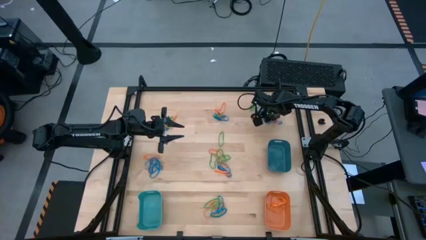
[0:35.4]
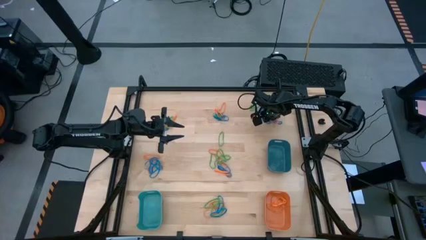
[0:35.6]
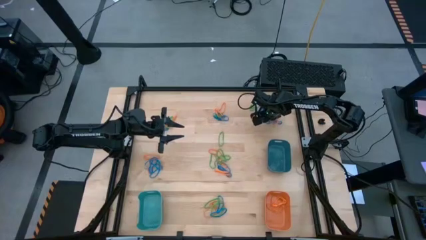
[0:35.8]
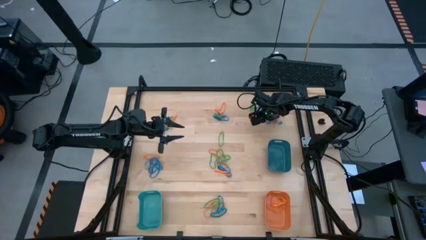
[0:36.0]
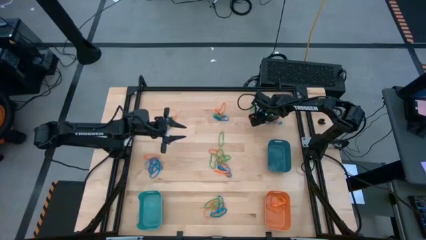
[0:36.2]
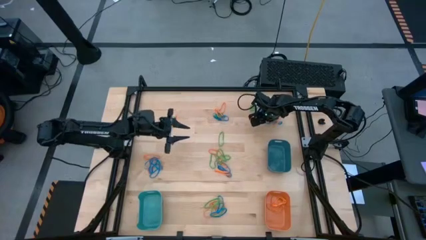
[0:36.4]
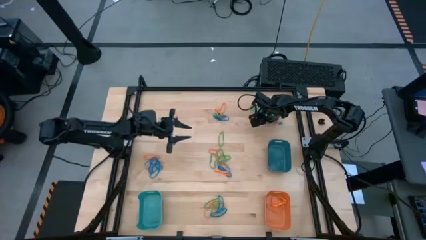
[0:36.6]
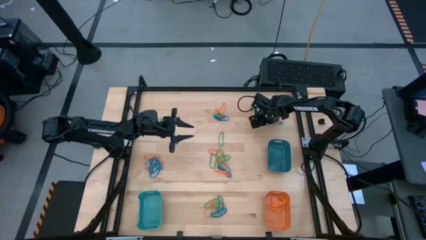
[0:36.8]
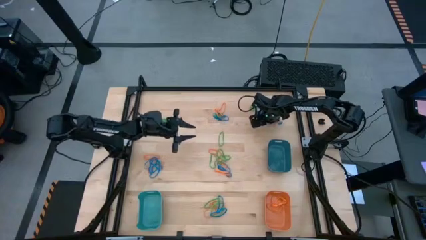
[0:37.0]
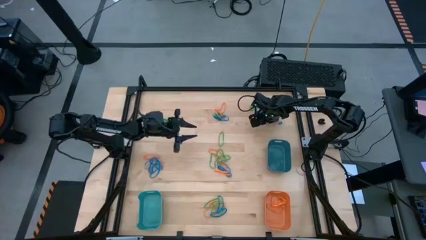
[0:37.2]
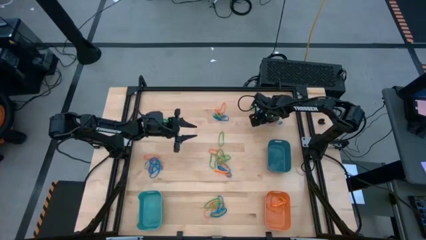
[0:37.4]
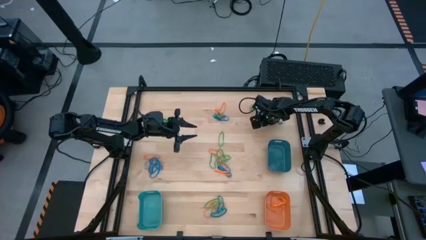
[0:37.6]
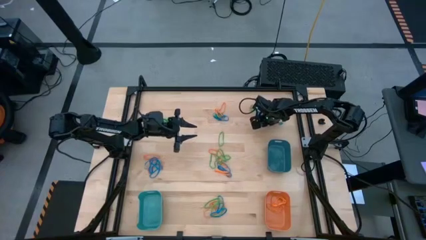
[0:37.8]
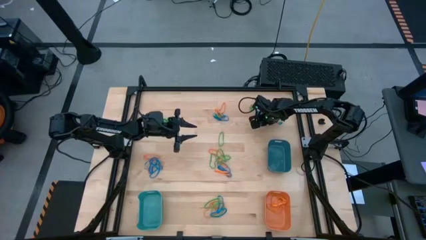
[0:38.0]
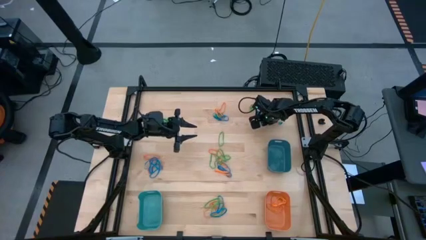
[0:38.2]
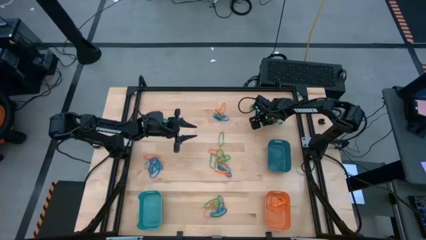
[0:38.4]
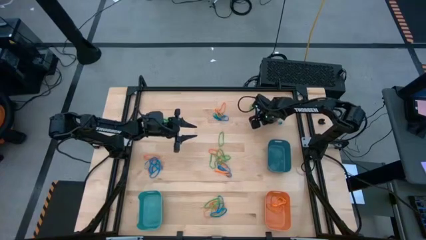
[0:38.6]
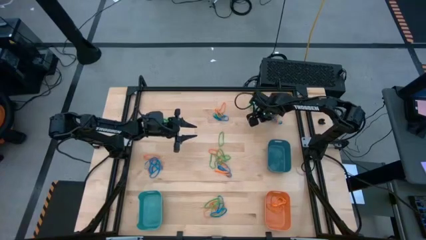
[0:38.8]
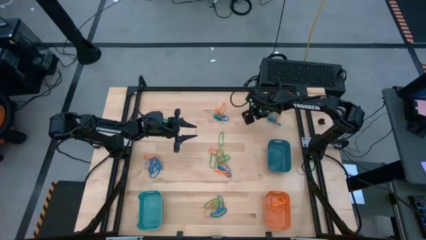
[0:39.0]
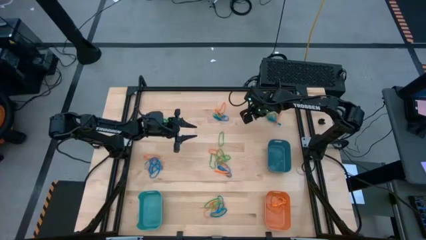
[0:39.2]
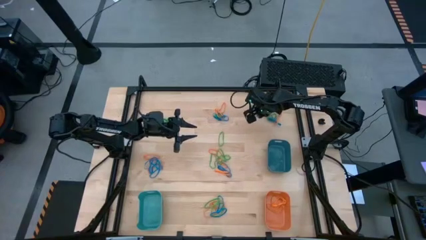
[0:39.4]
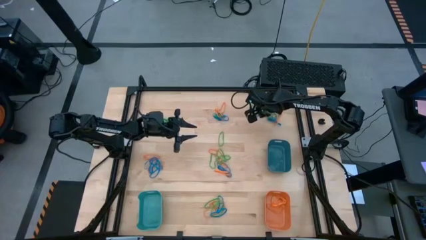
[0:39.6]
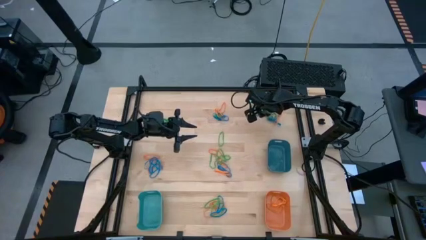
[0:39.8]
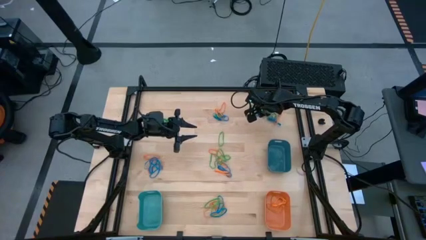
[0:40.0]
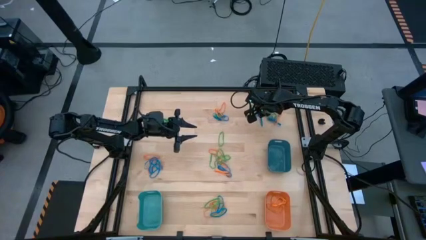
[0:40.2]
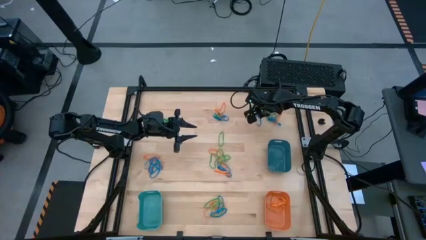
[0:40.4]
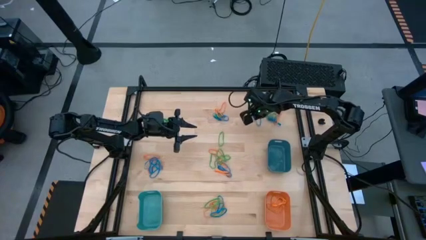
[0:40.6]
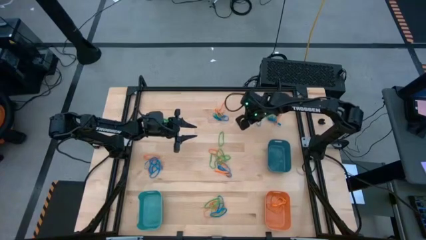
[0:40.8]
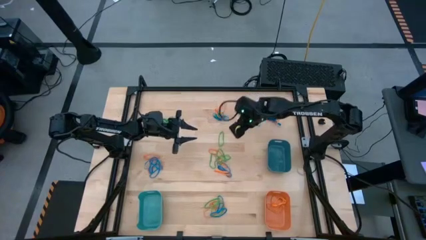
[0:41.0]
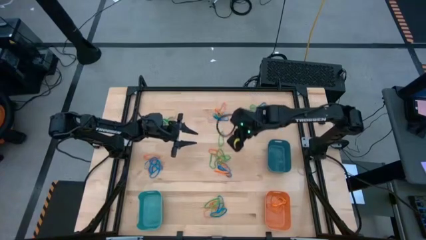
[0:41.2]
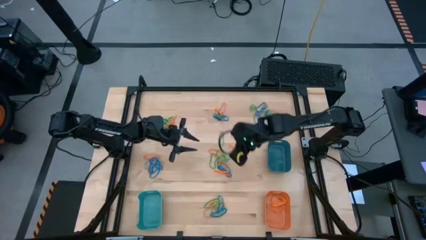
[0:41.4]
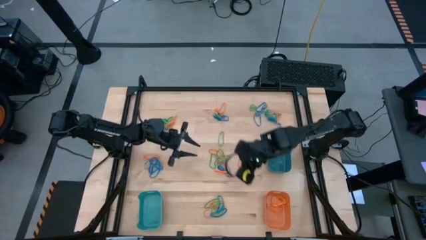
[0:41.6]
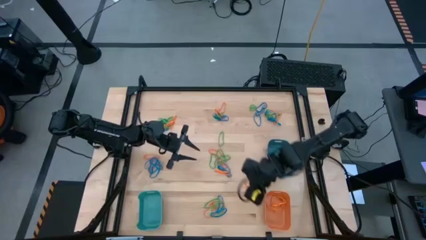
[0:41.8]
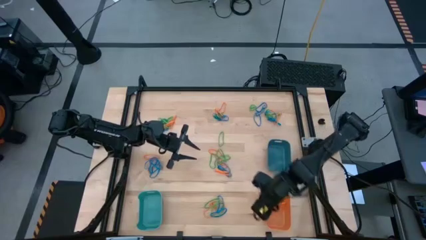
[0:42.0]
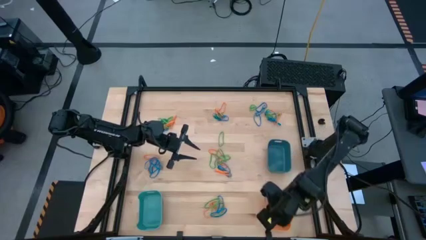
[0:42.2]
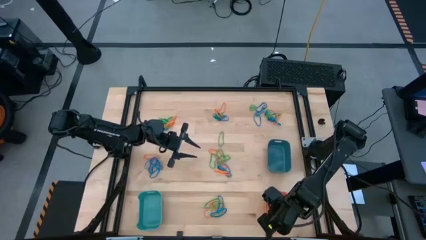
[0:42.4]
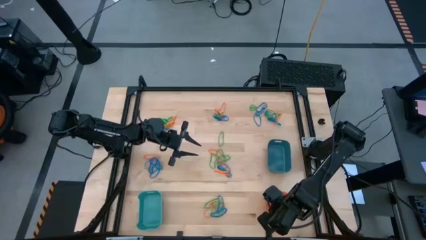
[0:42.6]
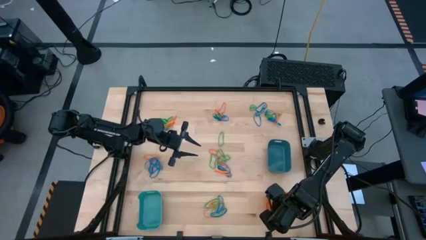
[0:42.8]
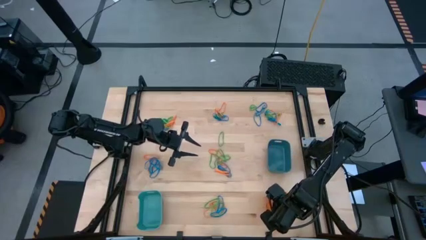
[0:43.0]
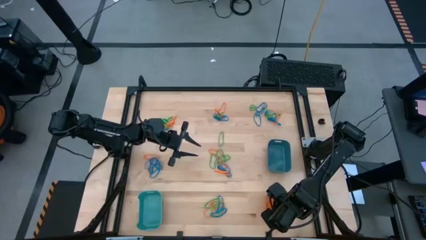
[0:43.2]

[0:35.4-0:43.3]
Task: Sort rubber bands into baskets
Put the orange rubber band into the orange bin

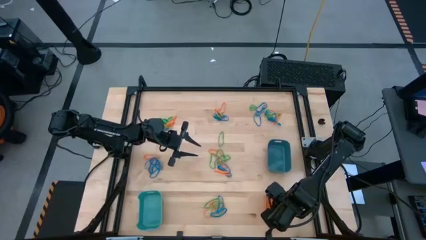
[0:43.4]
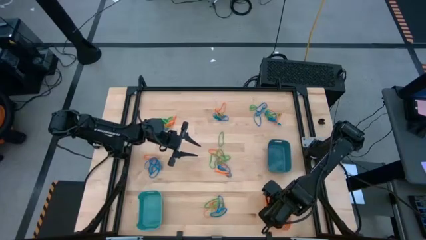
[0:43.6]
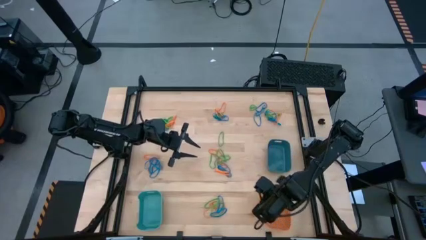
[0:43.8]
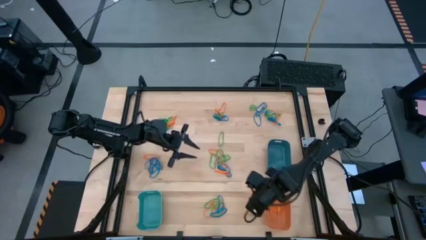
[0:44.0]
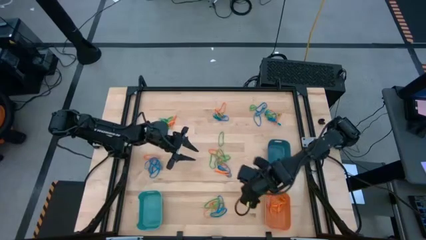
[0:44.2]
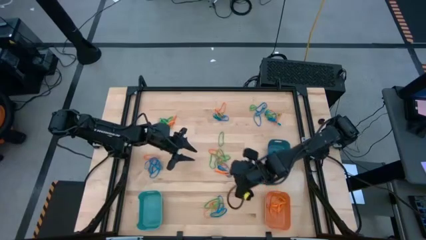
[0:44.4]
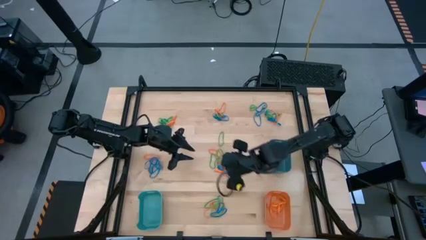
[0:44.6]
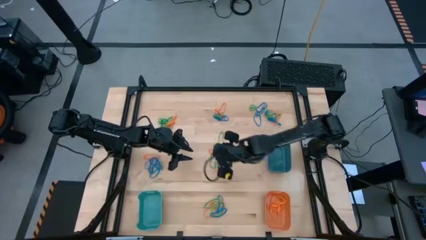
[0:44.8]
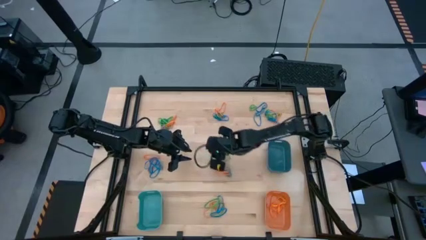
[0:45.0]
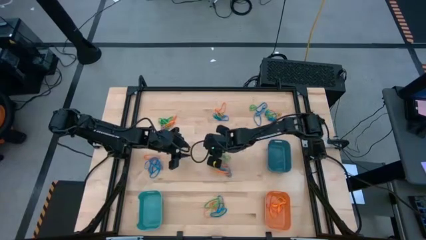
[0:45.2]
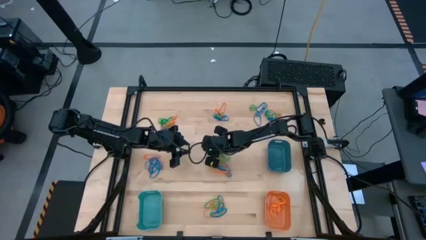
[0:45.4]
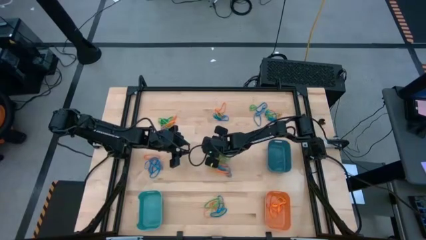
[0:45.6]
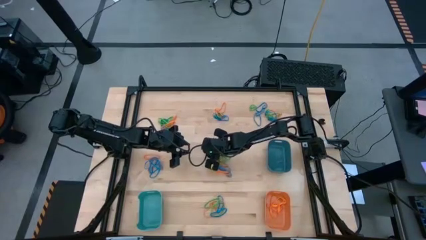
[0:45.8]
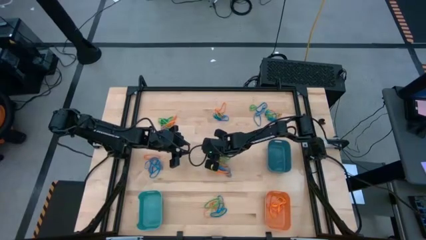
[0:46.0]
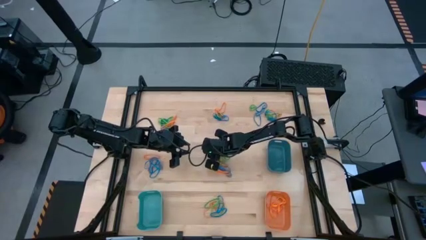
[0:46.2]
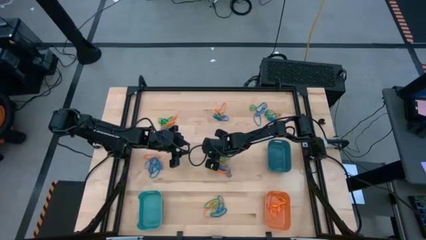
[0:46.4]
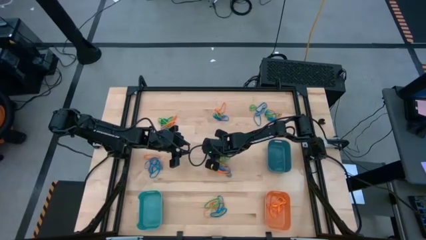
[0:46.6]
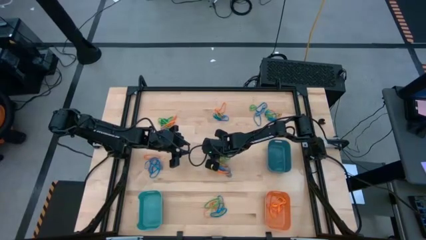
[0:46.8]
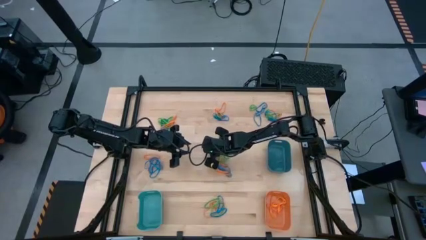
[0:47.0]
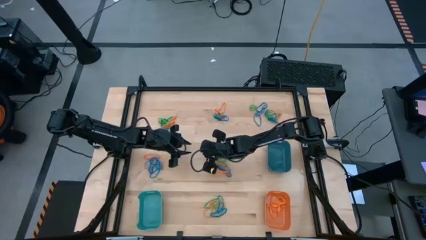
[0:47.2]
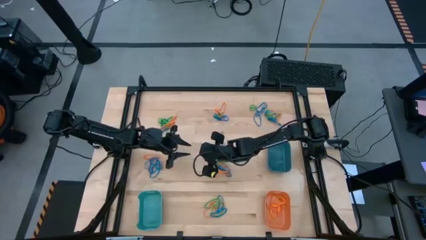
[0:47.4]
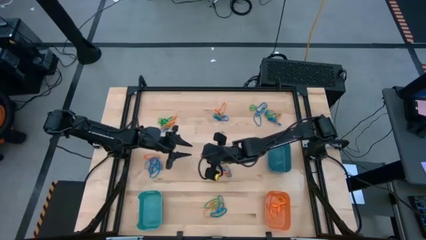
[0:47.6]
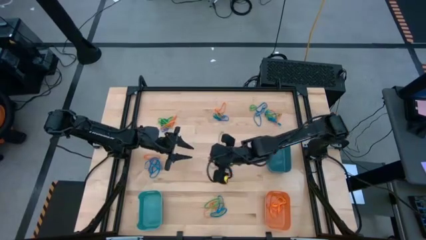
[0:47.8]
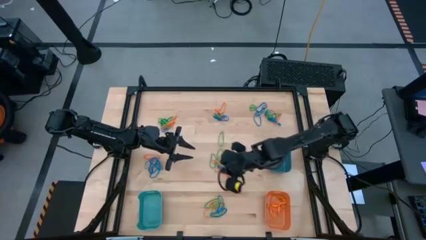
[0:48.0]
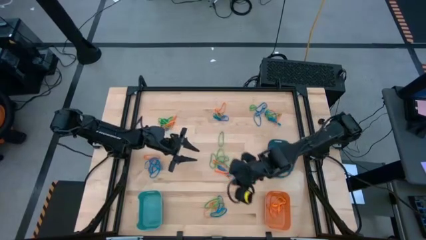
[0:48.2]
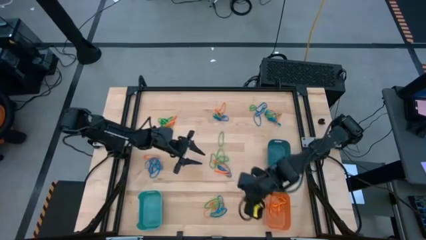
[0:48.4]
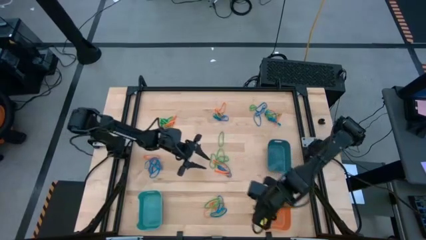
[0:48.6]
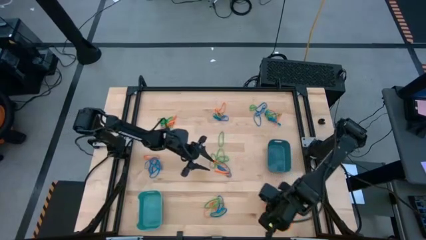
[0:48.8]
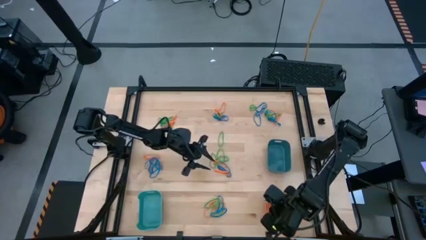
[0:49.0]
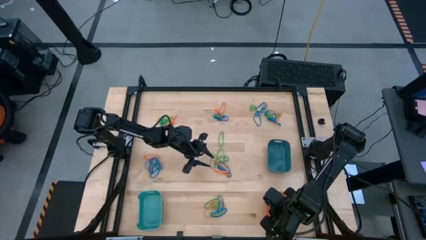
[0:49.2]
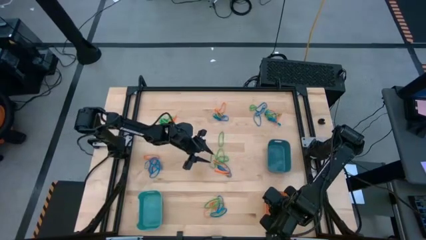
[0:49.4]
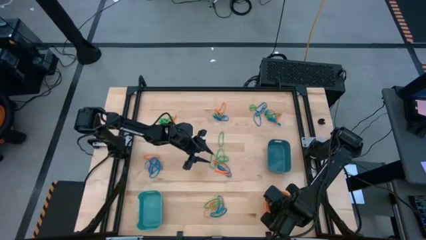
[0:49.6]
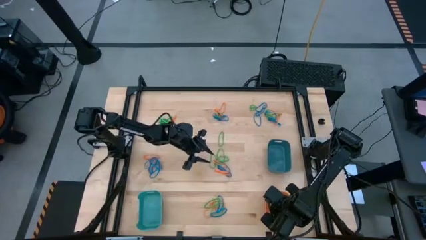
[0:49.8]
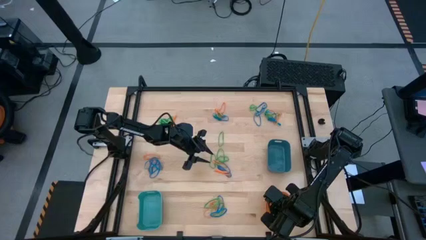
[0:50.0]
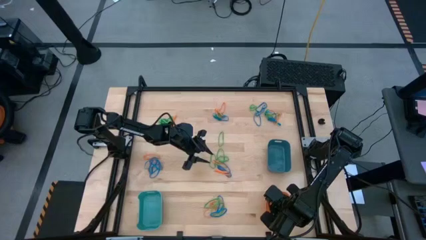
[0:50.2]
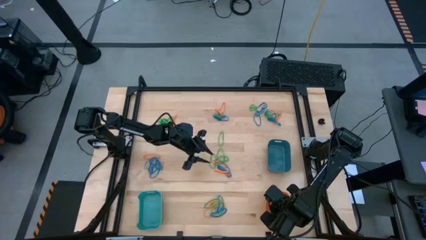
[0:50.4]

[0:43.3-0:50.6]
Put the orange rubber band into the orange bin
